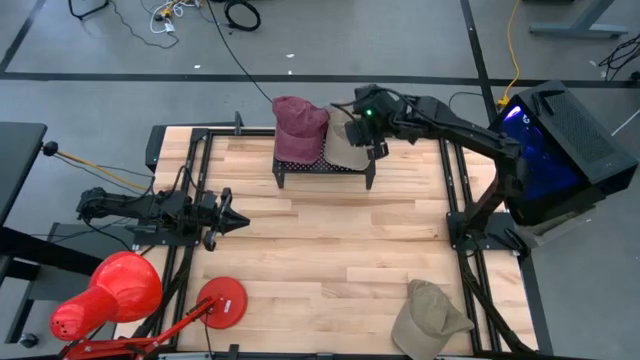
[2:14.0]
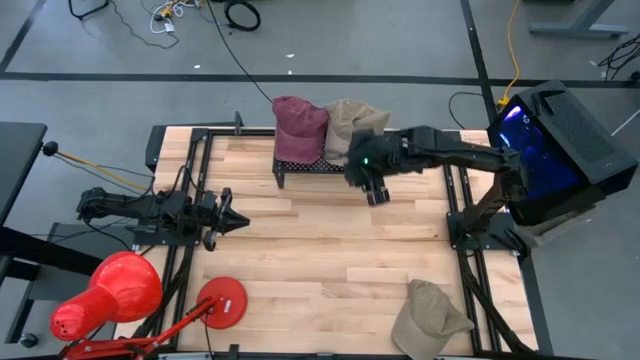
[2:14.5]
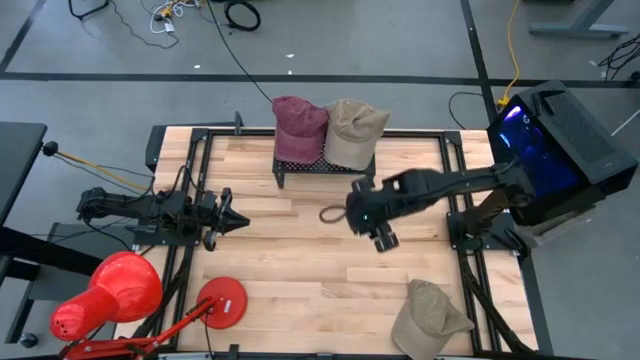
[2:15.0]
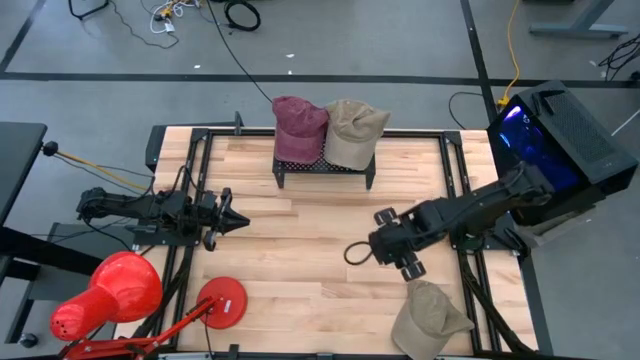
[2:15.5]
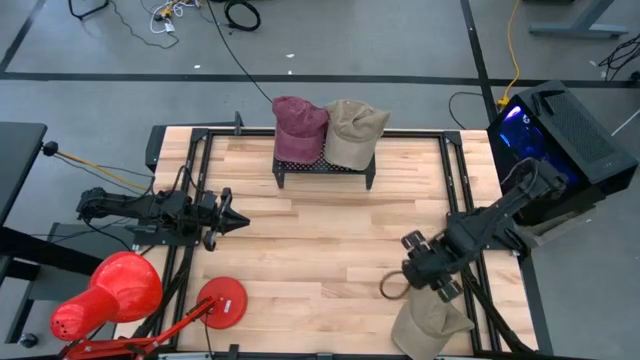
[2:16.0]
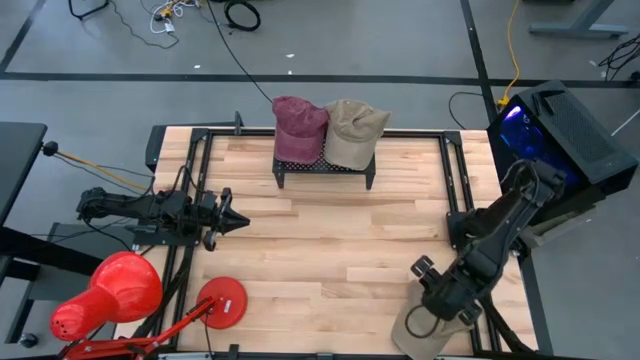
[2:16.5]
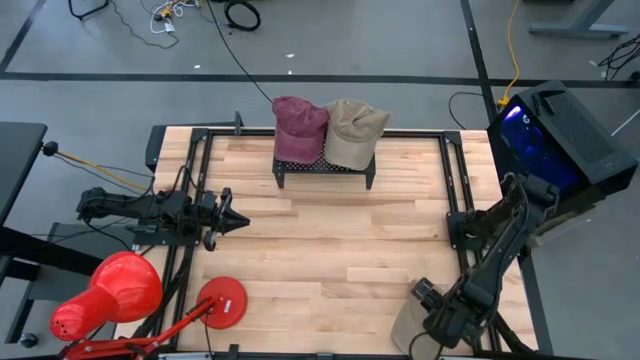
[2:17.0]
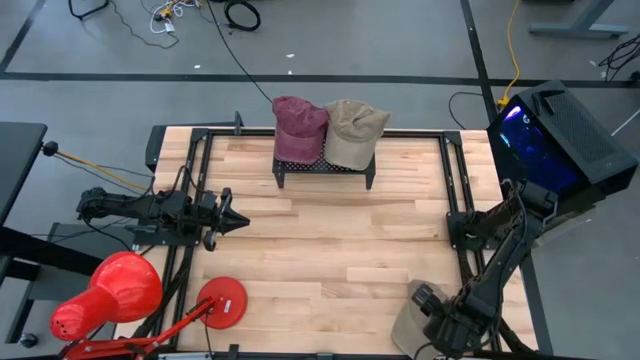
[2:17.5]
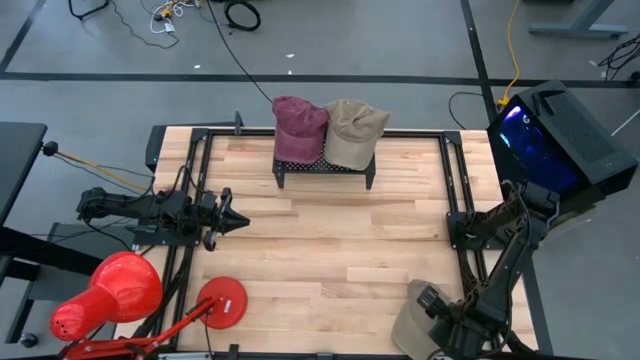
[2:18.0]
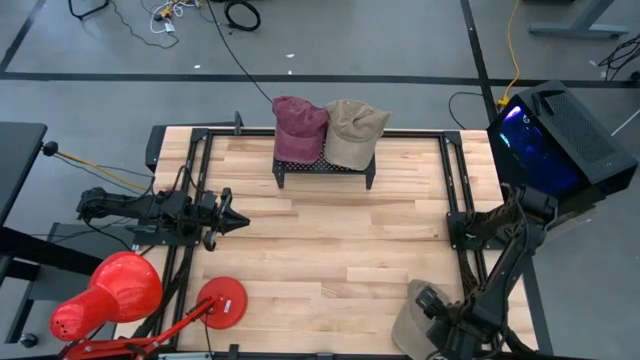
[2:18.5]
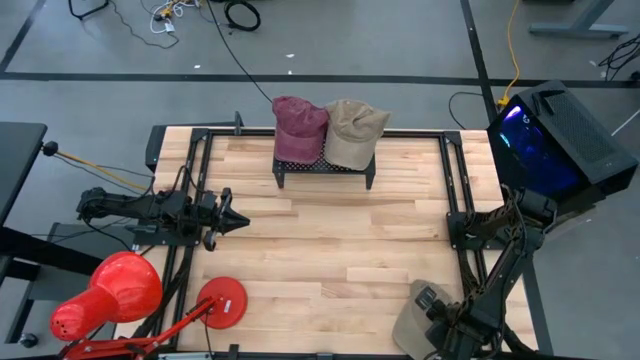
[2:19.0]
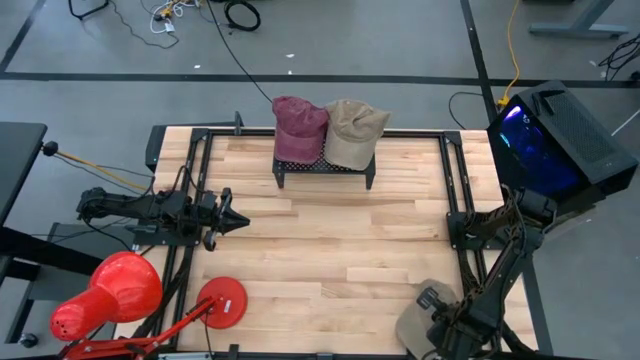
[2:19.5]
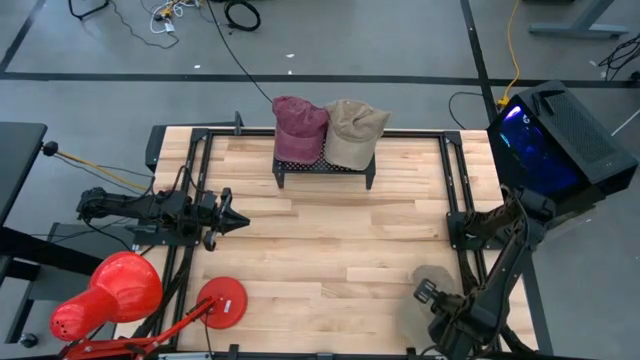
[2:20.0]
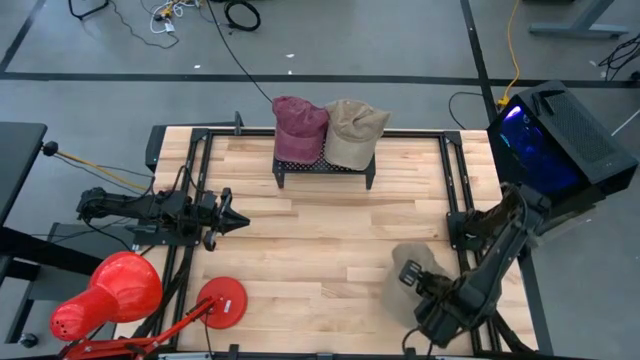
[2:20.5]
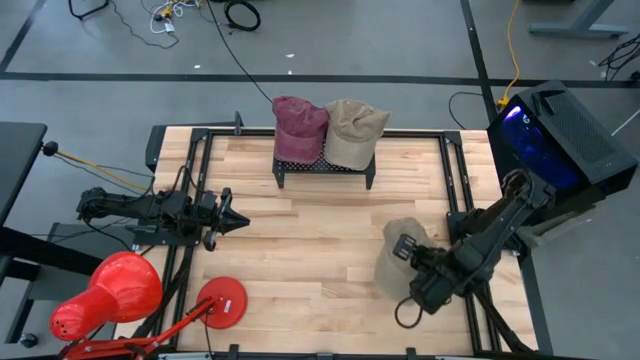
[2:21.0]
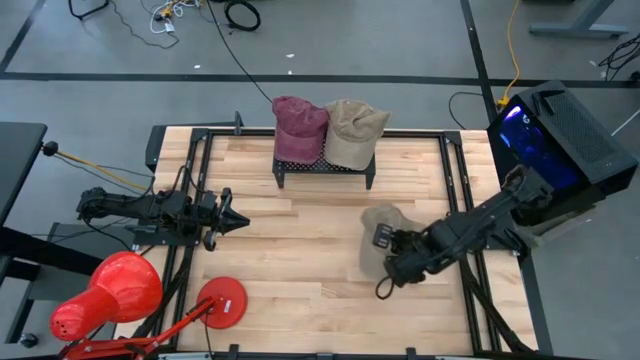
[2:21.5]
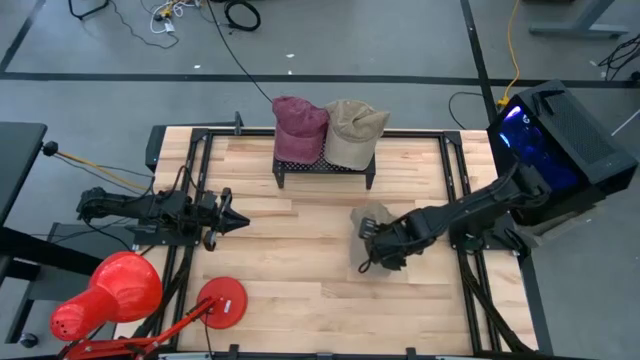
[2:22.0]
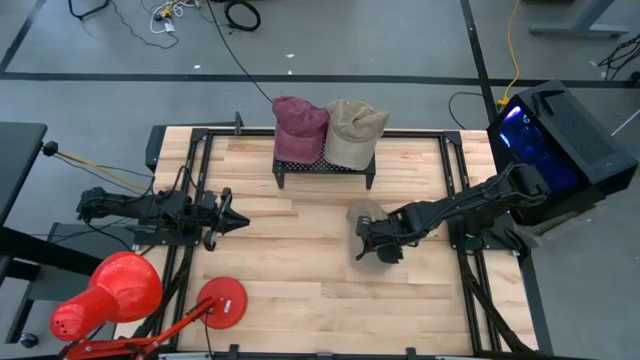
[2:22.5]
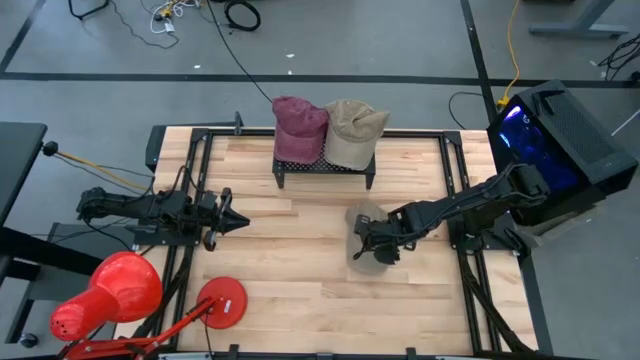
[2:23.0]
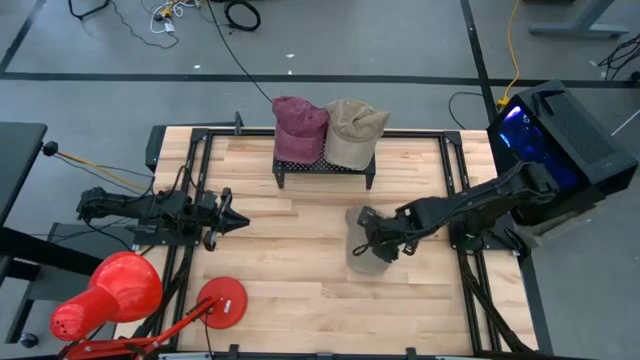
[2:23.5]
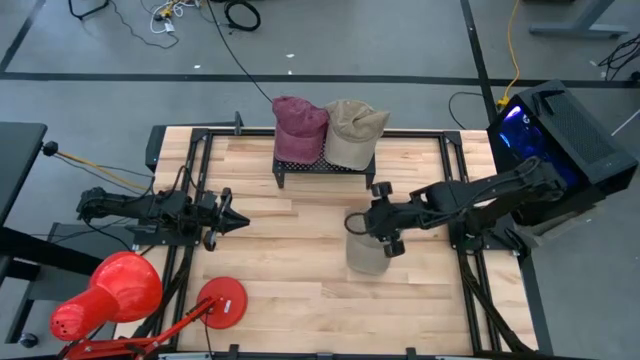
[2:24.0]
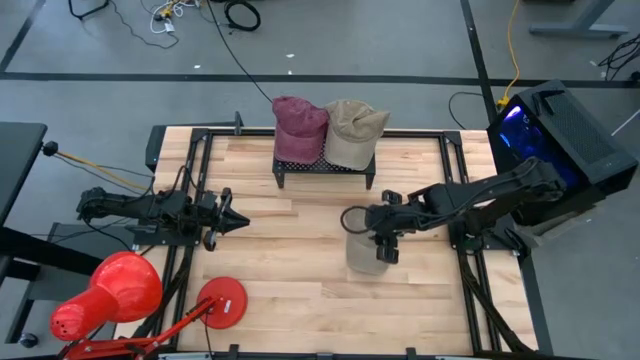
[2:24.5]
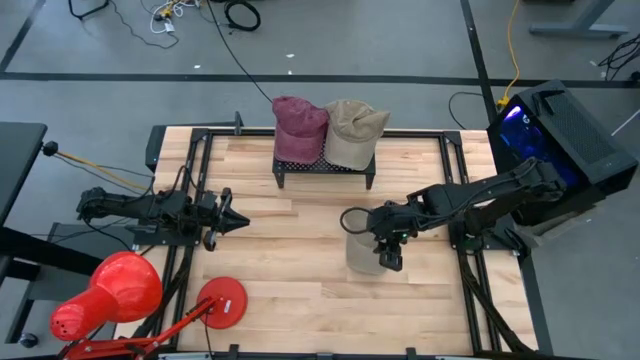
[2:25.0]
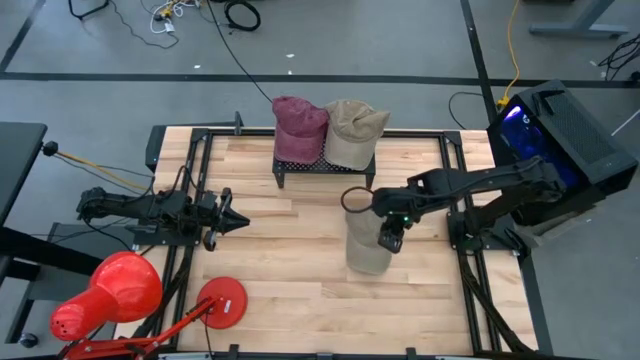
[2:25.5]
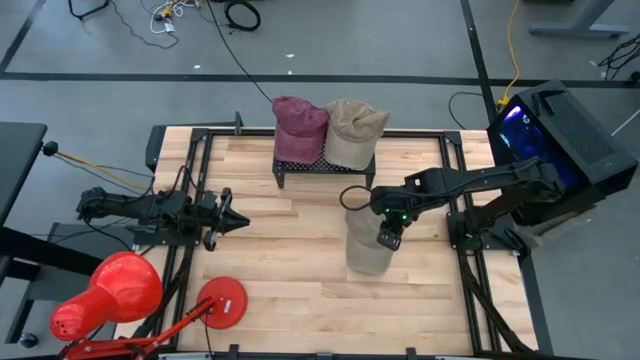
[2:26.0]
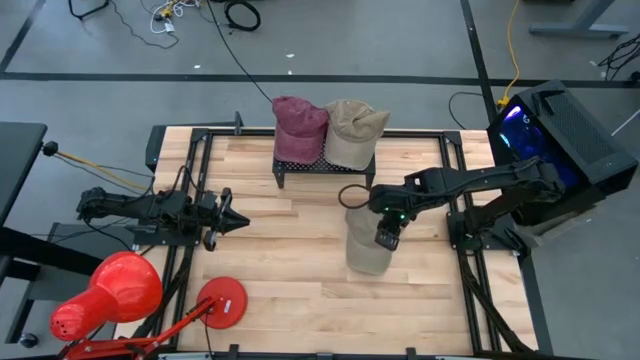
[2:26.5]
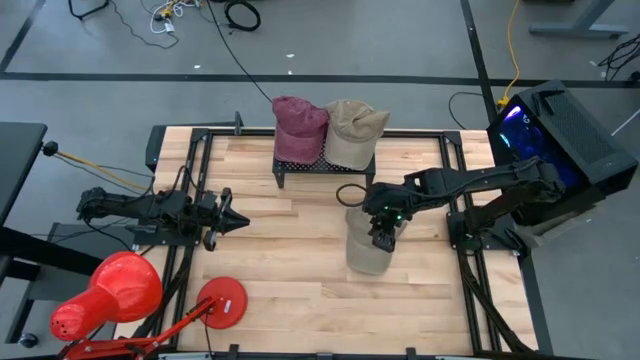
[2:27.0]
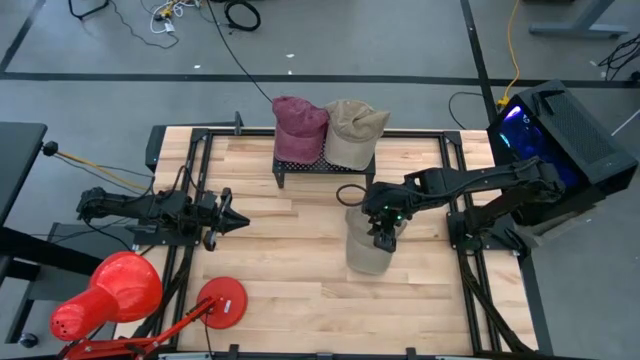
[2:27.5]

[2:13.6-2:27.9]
Task: Pick & Place hat
Stack the brown cap on top of the brown cap on the shelf

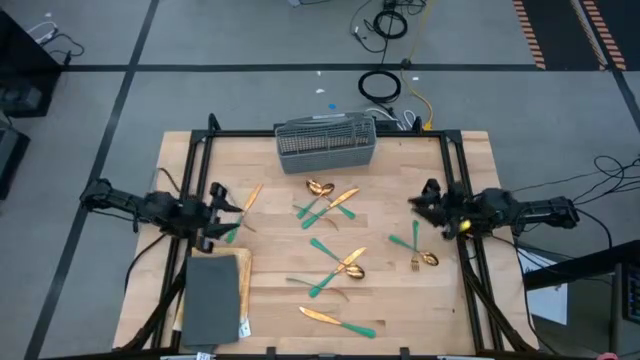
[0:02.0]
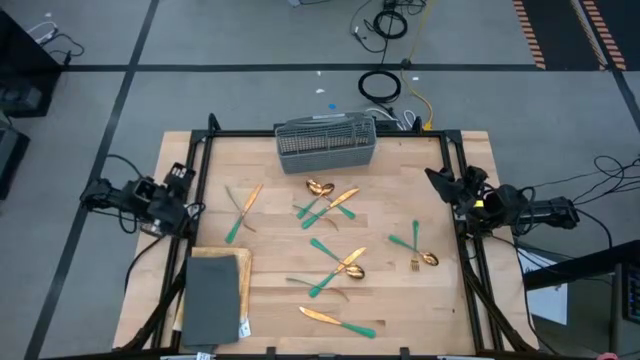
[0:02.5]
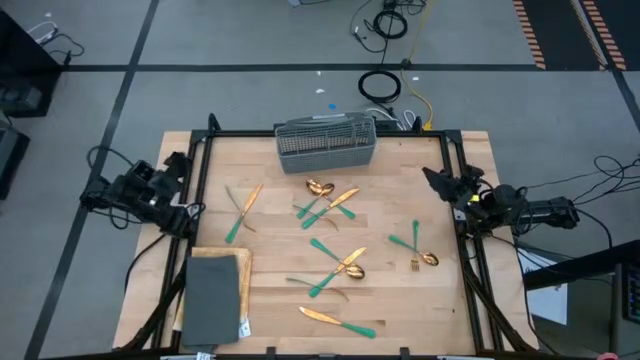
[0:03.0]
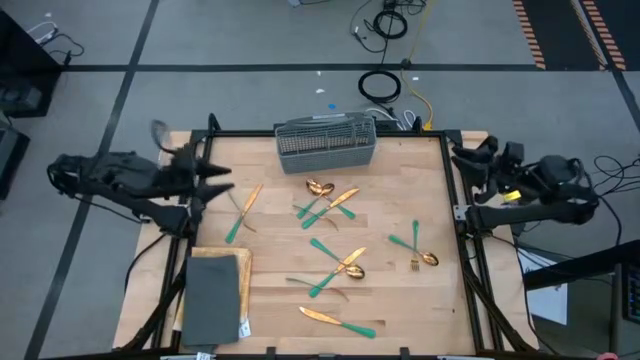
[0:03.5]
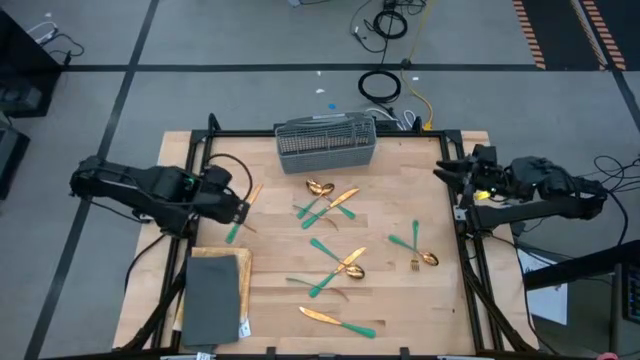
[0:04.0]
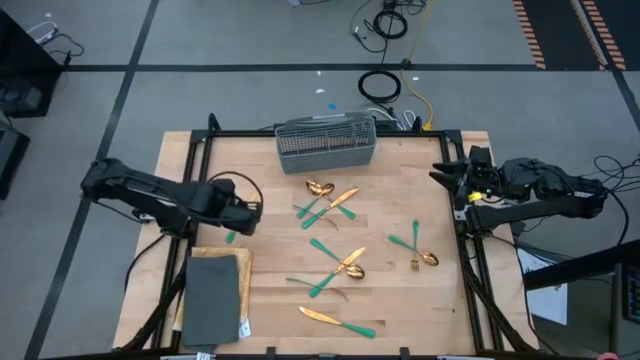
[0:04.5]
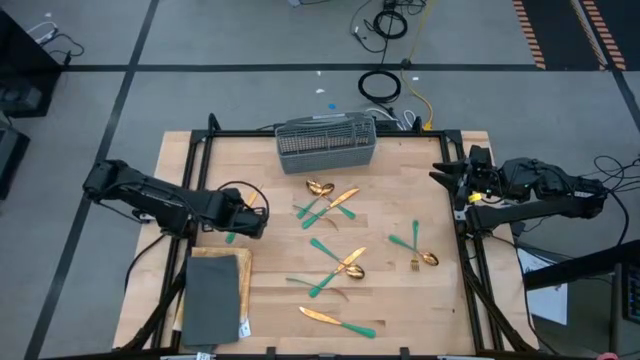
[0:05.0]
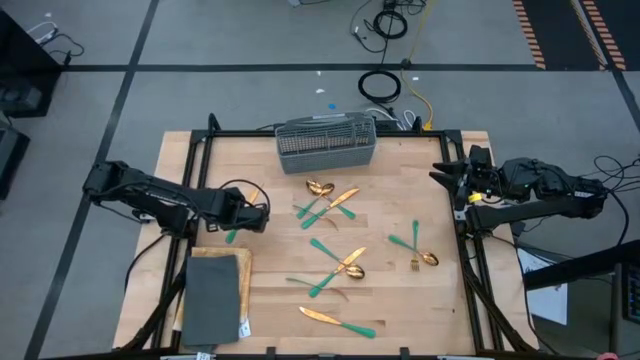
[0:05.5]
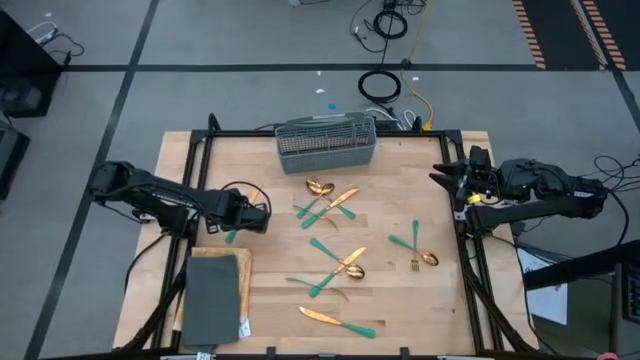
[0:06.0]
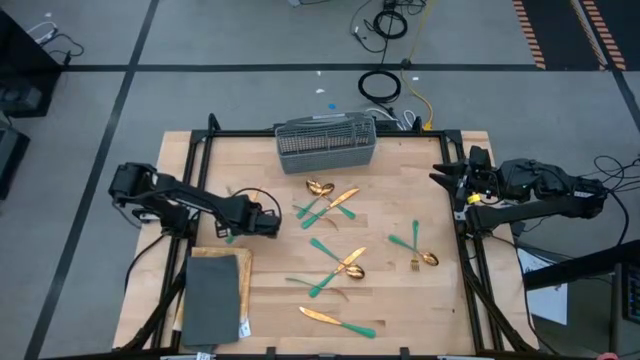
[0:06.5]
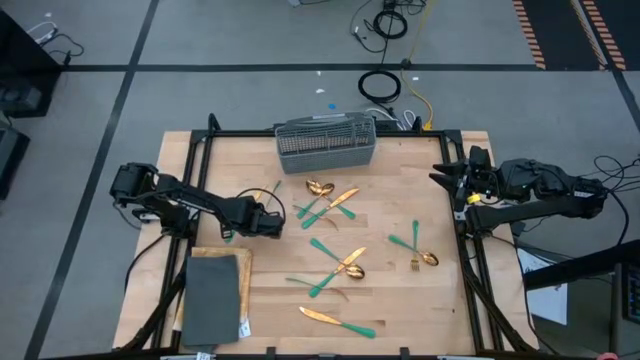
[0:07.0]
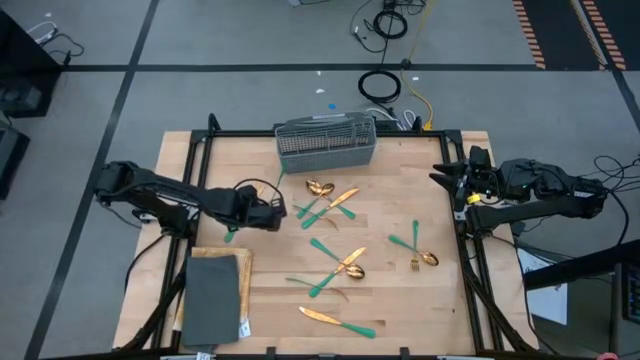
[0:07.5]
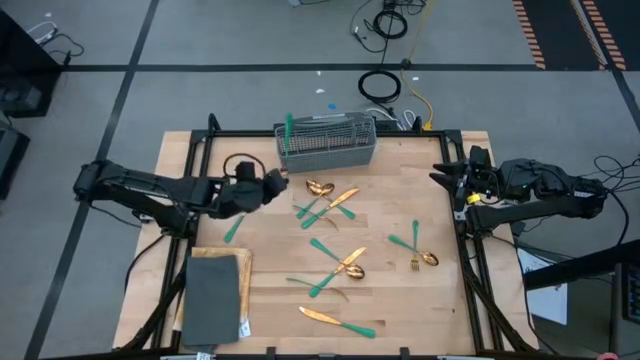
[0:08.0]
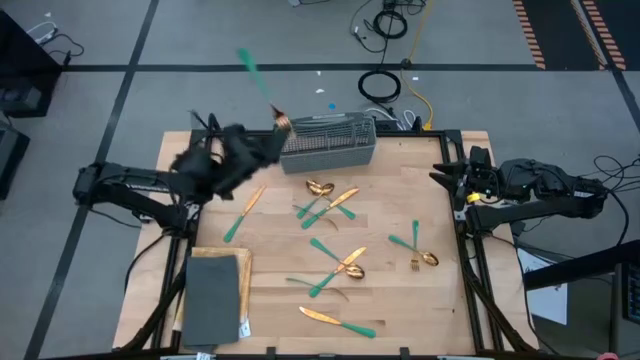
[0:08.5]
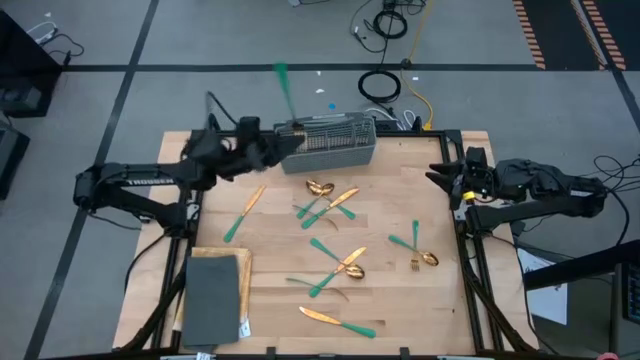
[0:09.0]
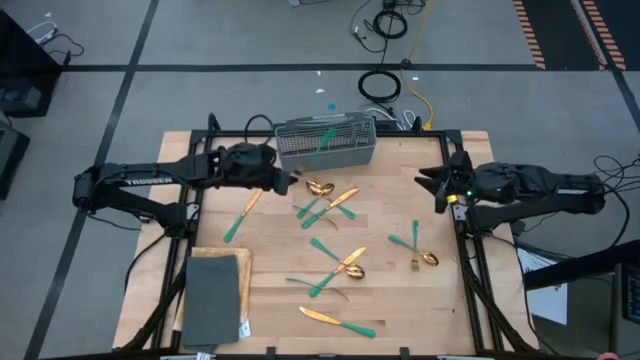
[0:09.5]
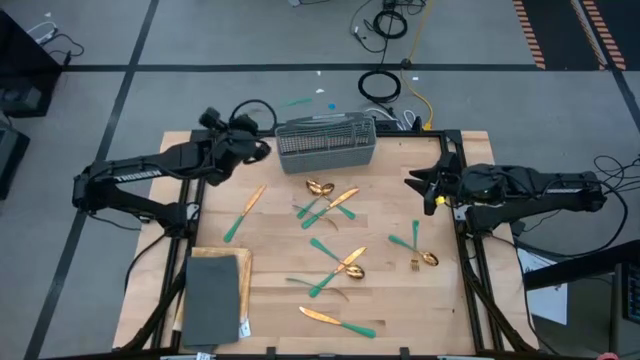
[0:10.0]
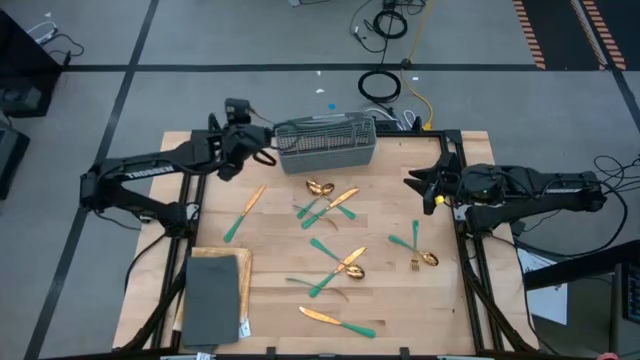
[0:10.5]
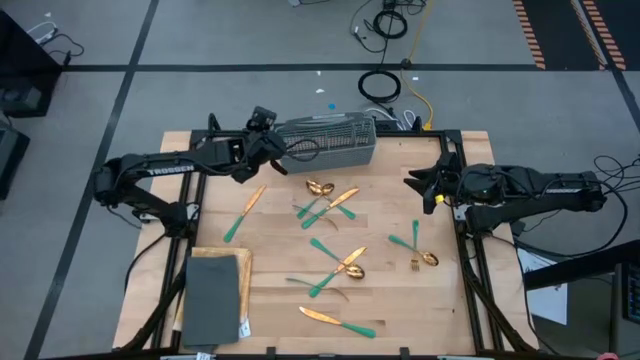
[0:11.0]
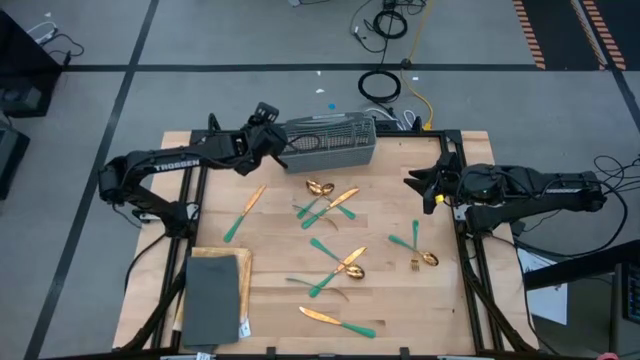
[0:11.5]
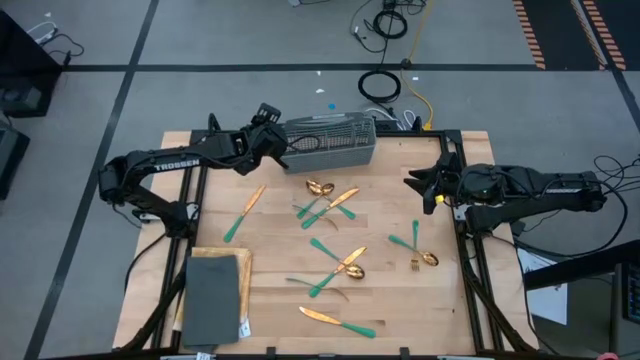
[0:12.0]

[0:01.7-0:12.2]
Task: Sort silverware
Put the green fork into the silverware basket
